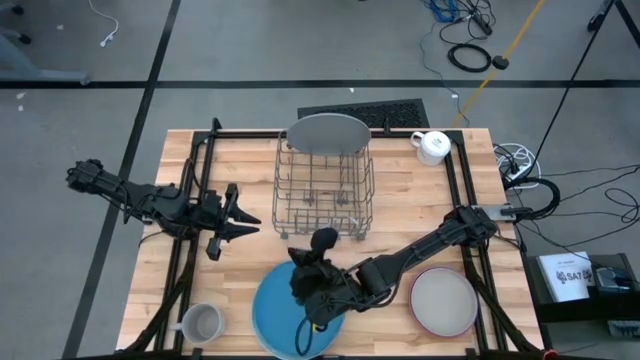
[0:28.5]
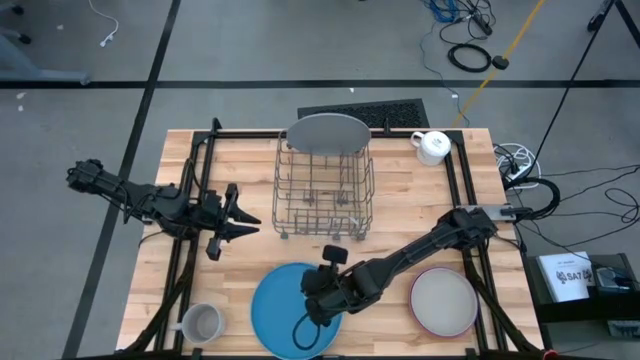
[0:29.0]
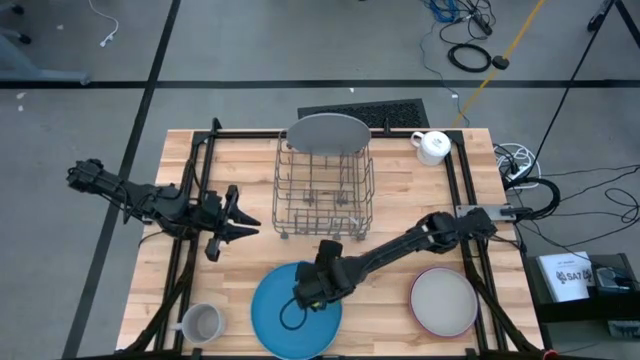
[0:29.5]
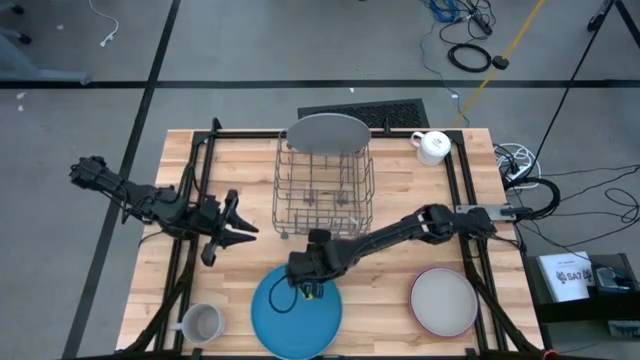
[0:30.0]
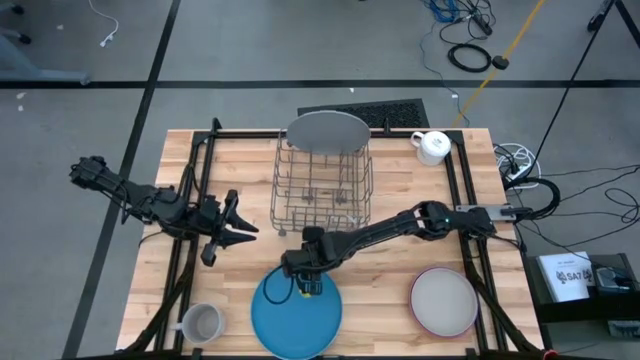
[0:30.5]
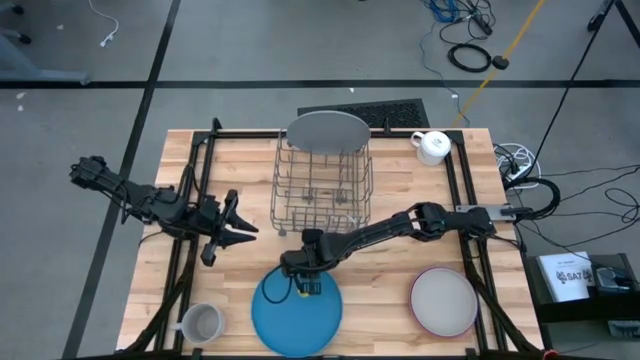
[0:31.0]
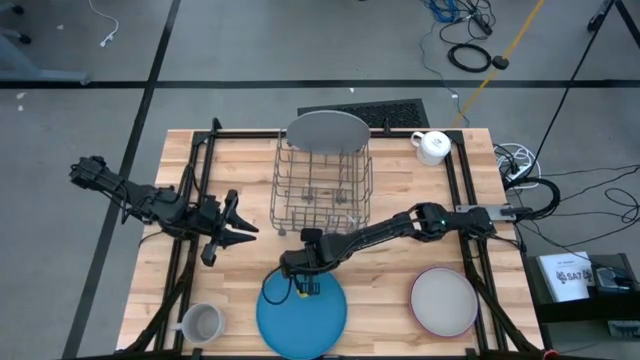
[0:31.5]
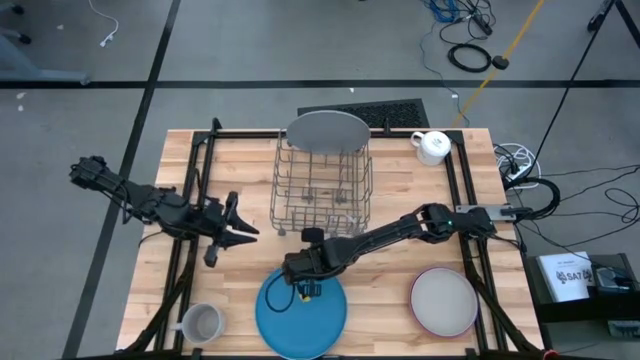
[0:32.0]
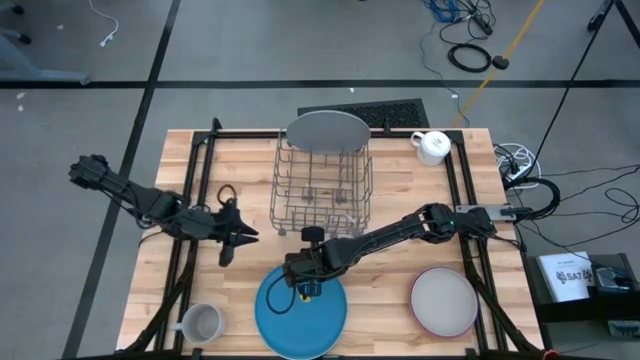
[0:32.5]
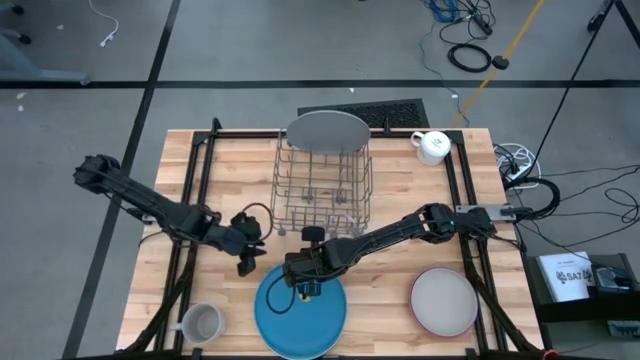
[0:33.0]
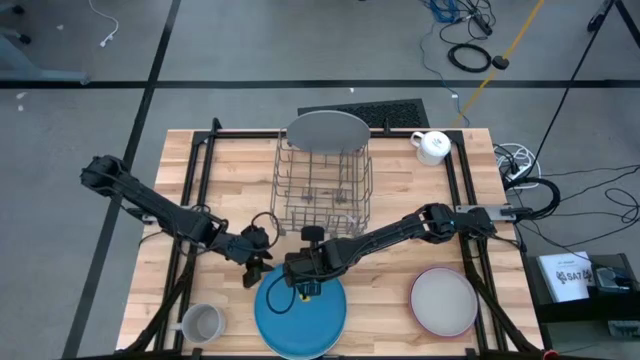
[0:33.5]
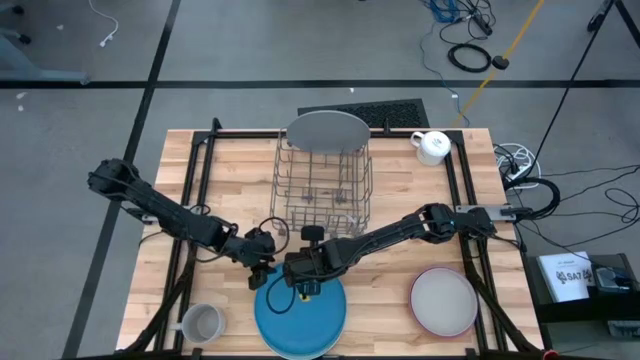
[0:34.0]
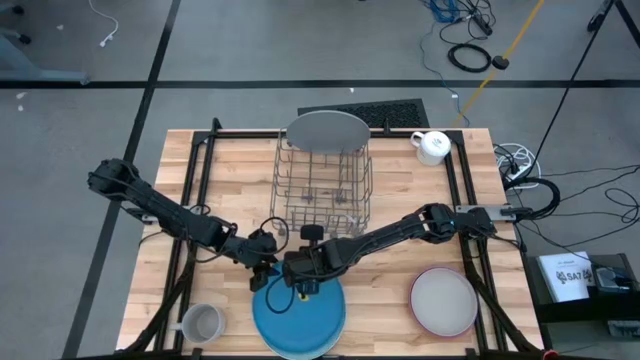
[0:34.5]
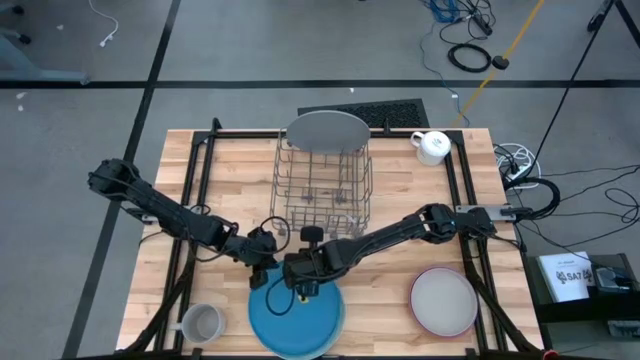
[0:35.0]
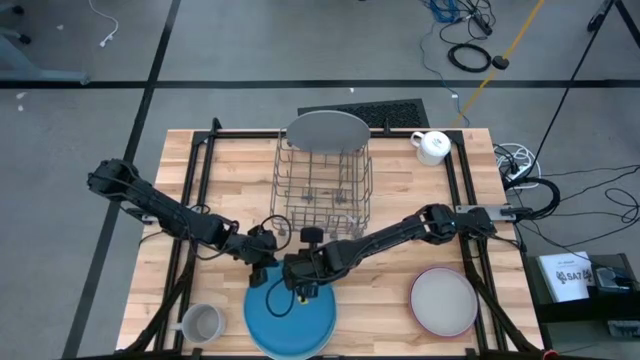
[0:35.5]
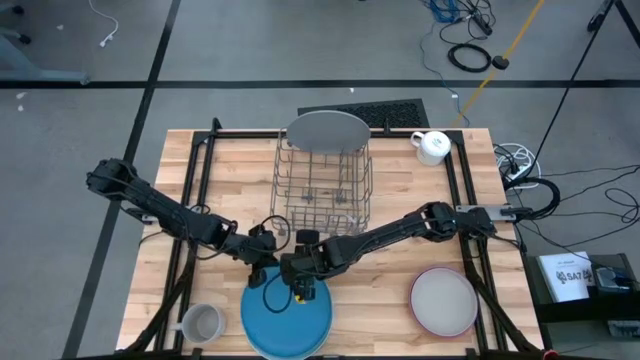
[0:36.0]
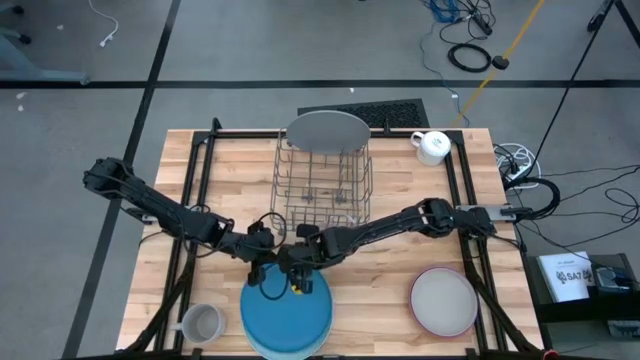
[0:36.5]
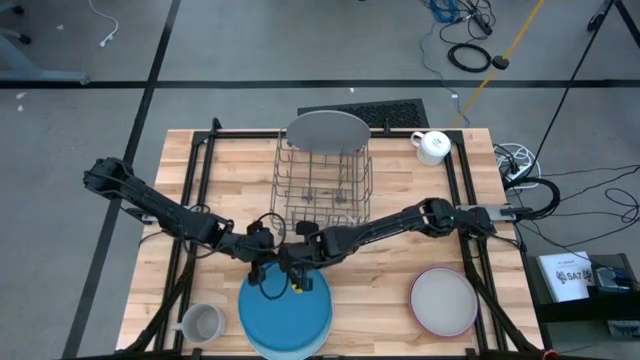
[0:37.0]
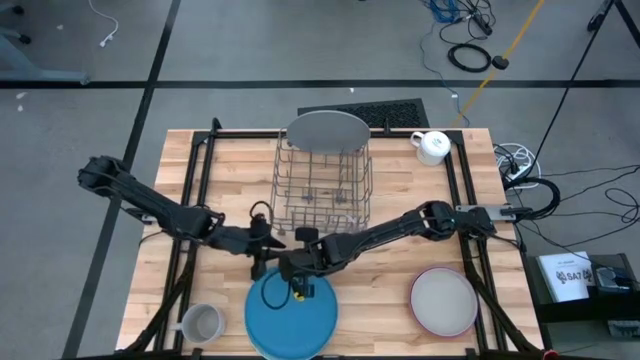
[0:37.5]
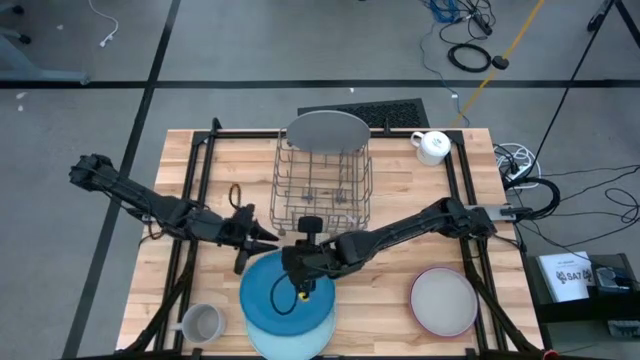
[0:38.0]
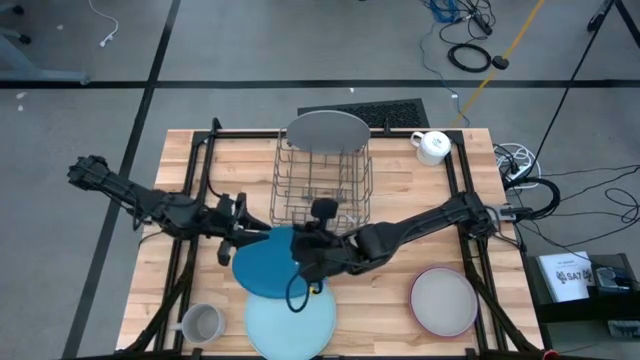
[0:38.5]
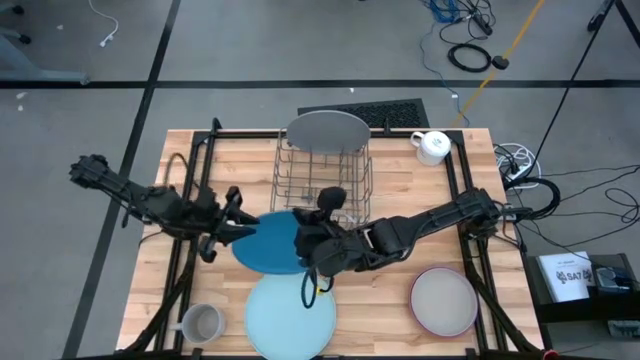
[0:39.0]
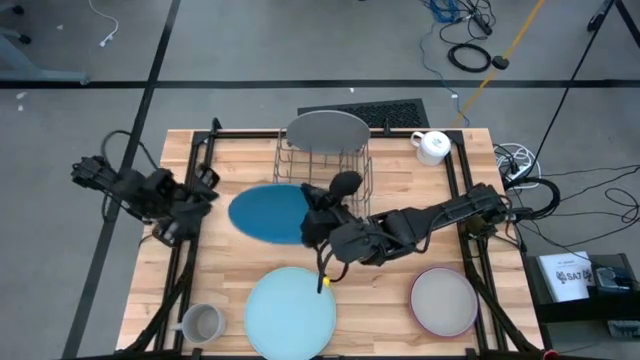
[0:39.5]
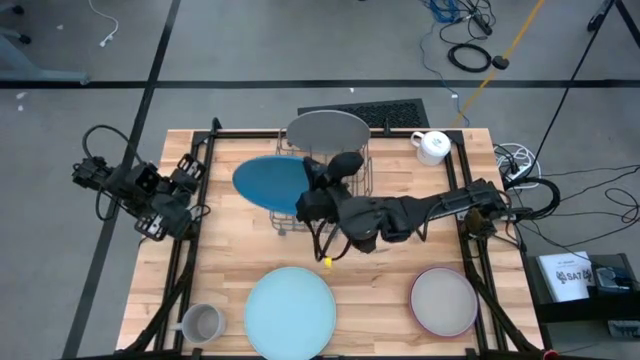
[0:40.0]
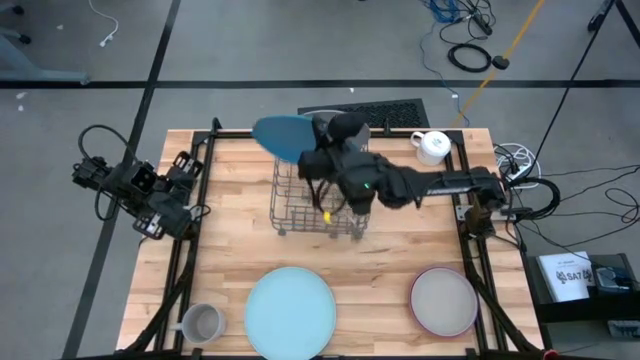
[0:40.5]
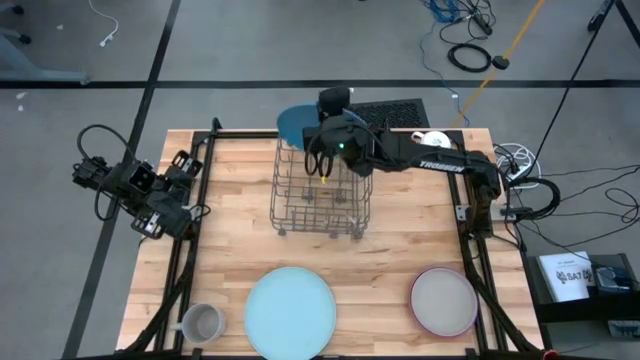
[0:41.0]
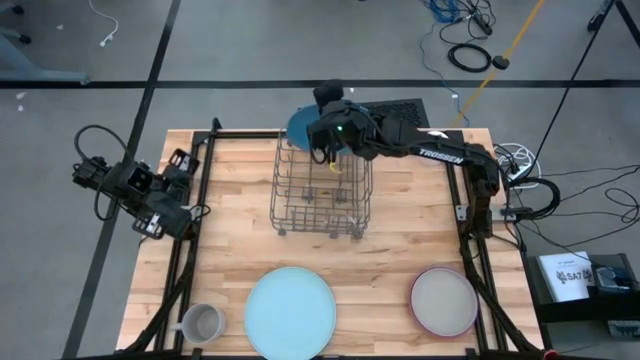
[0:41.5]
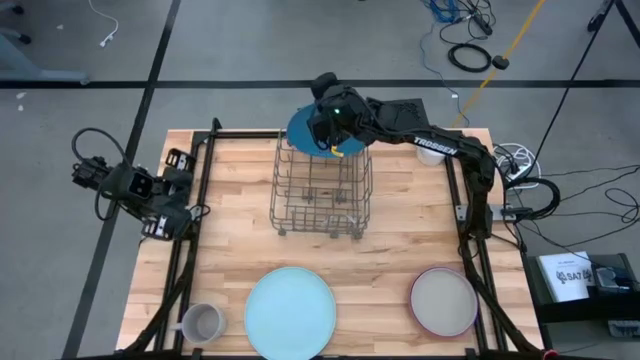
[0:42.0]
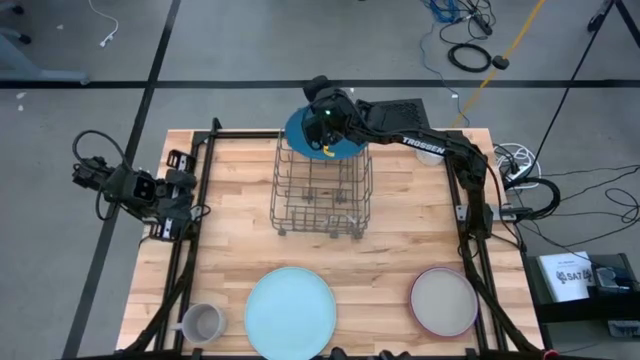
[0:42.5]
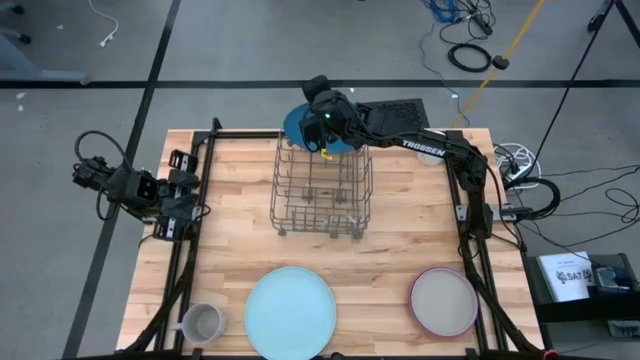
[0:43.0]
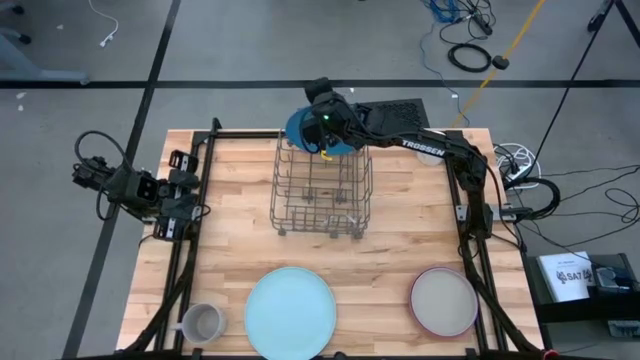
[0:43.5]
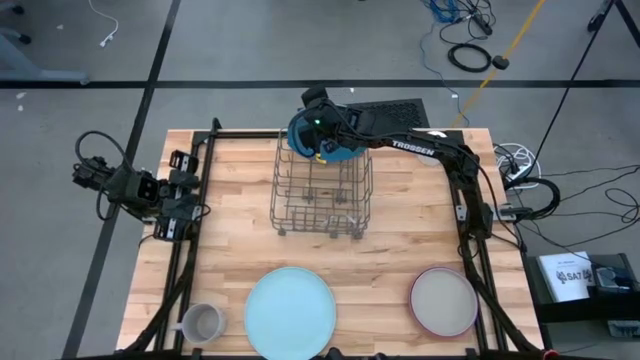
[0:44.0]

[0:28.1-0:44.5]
Task: Sort dishes
Put the blue plate into the dish rack

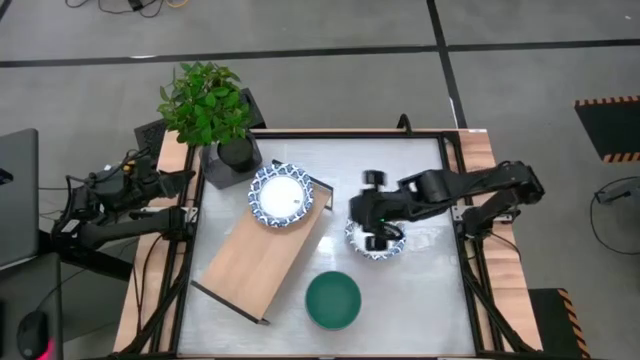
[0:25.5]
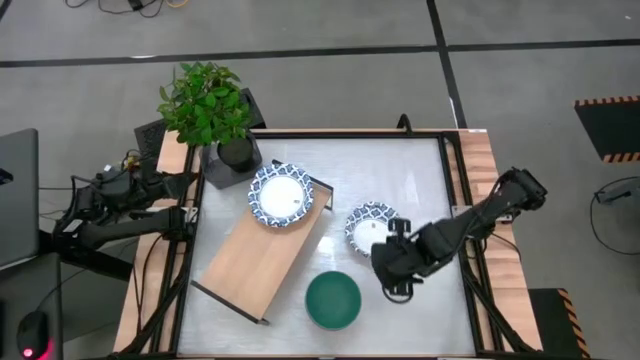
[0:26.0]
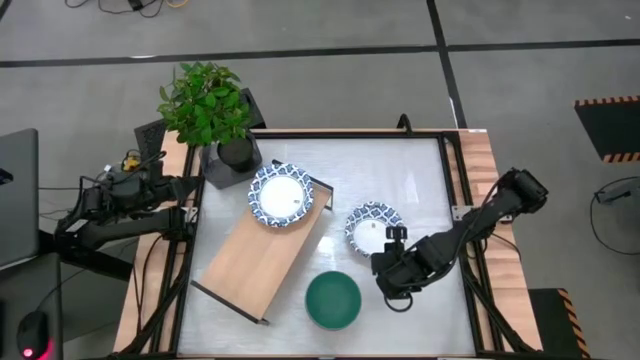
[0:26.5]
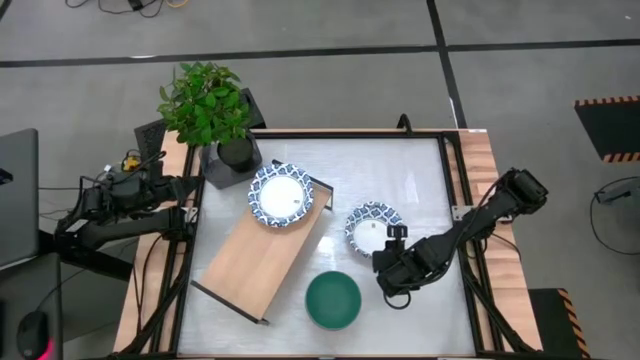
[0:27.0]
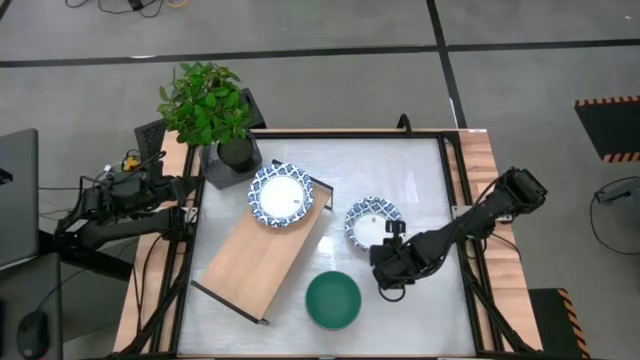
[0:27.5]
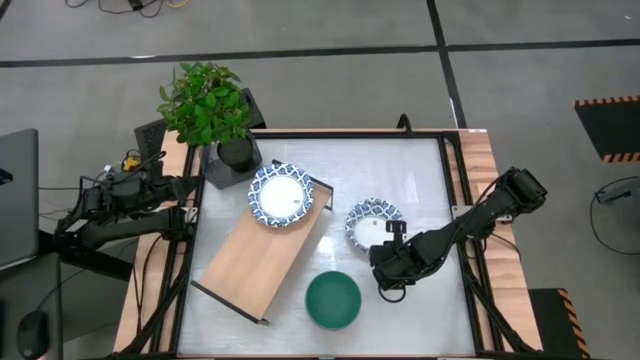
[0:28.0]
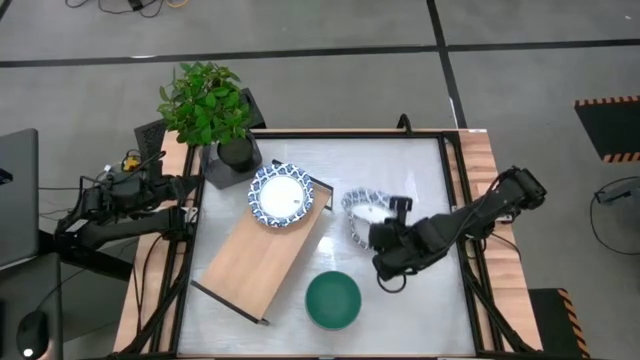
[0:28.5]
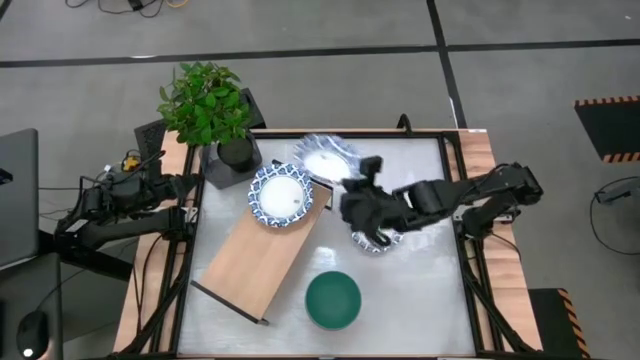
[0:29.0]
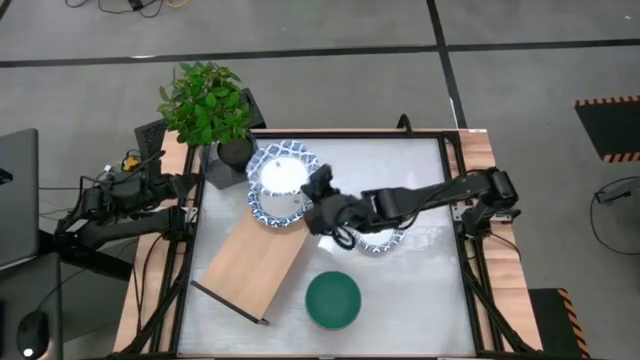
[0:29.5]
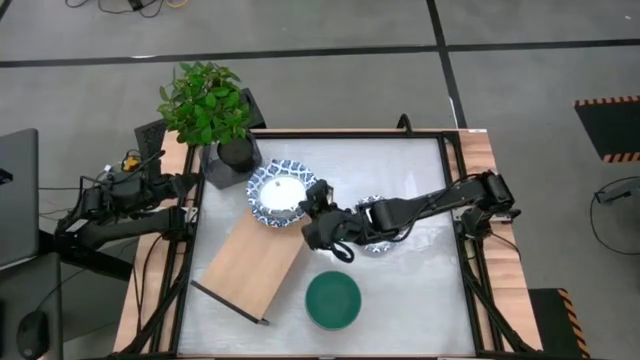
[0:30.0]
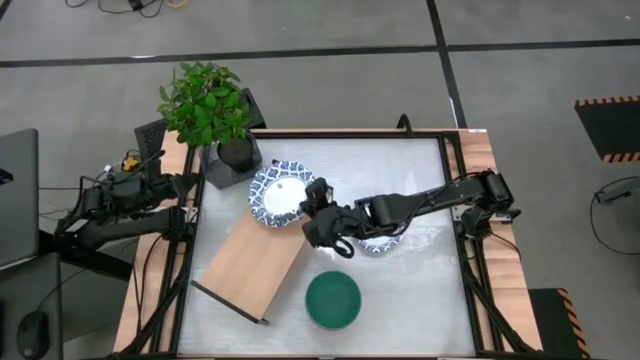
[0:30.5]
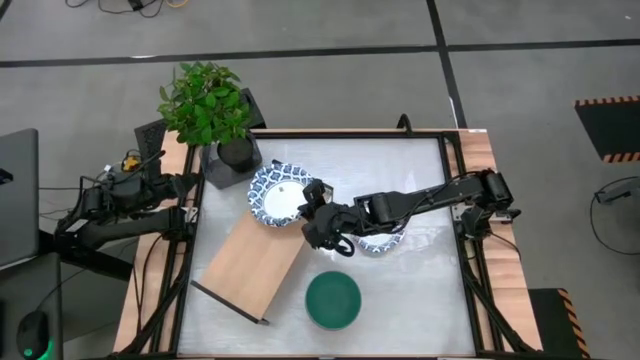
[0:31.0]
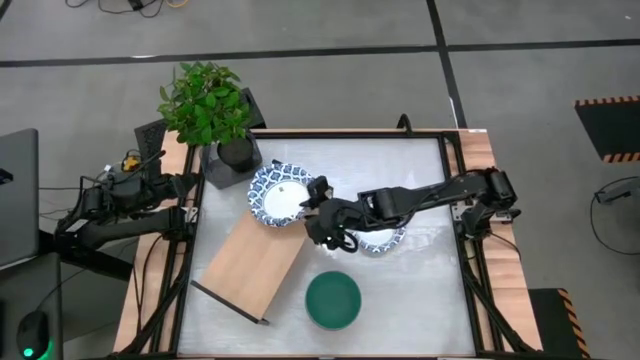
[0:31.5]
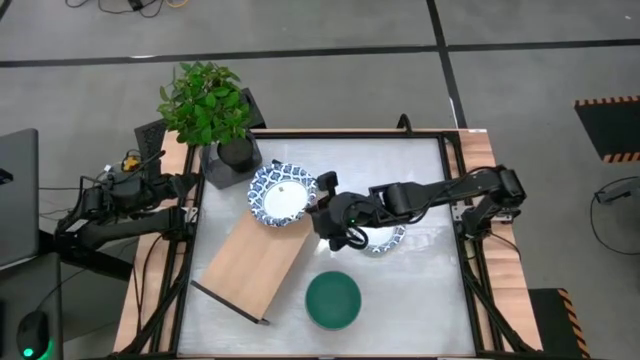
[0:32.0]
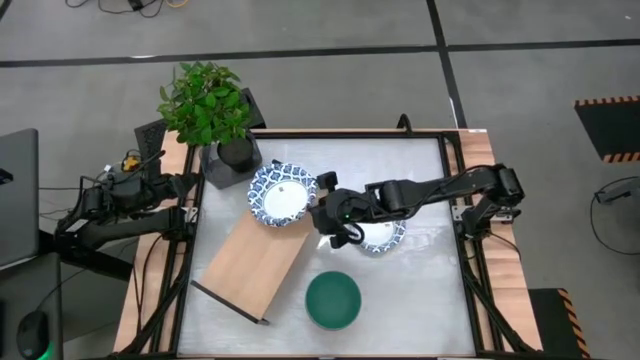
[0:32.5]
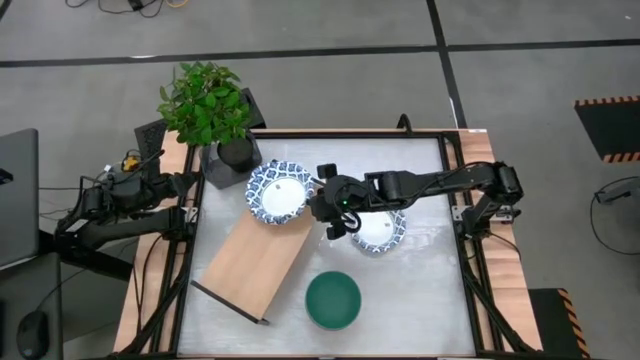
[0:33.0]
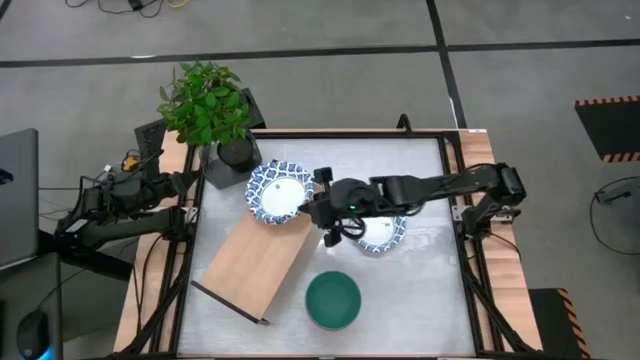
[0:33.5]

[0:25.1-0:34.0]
Task: Place and stack bowls onto a shelf
Stack the white patterned bowl on the white patterned bowl on the shelf
